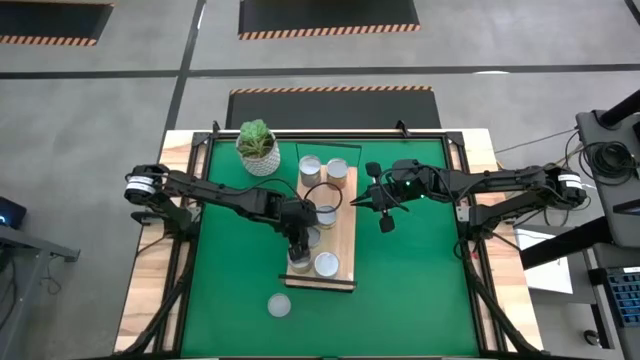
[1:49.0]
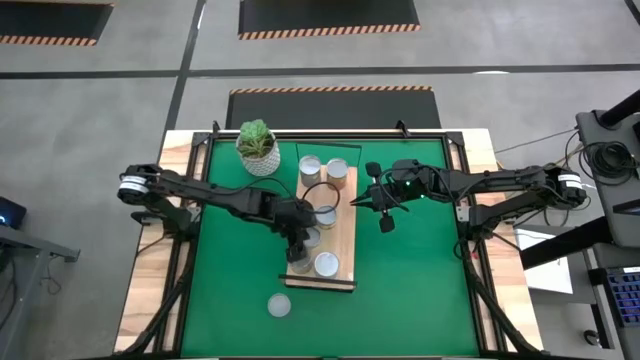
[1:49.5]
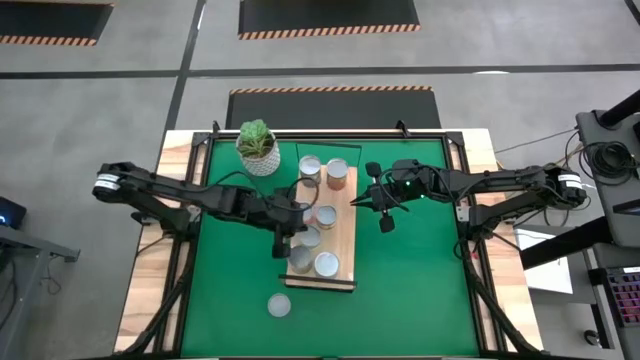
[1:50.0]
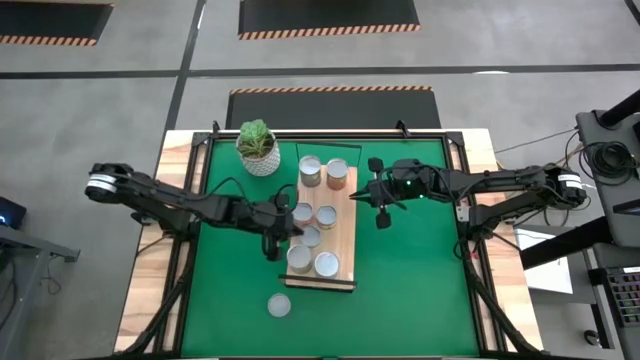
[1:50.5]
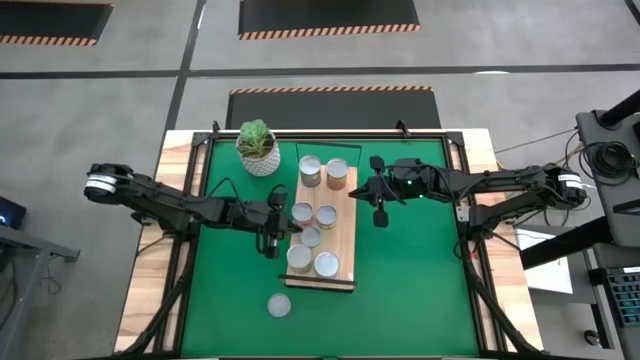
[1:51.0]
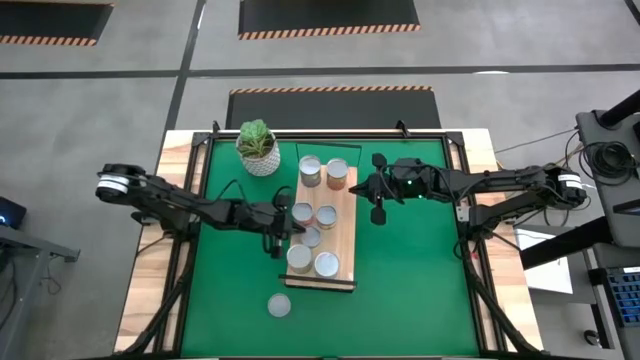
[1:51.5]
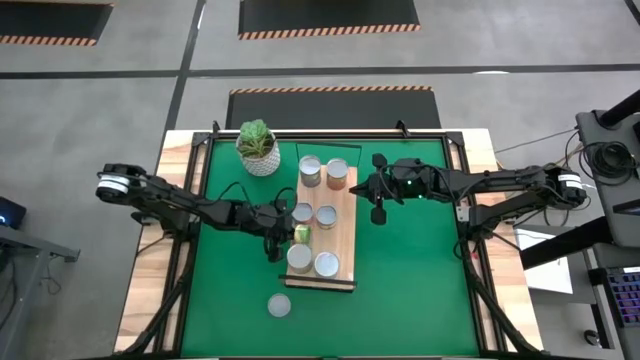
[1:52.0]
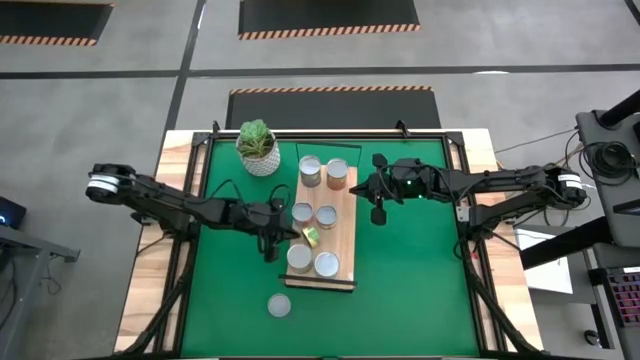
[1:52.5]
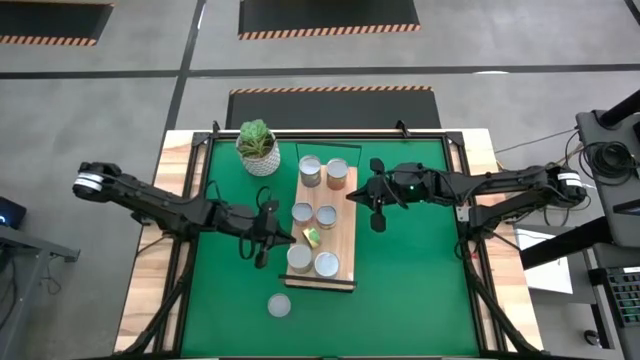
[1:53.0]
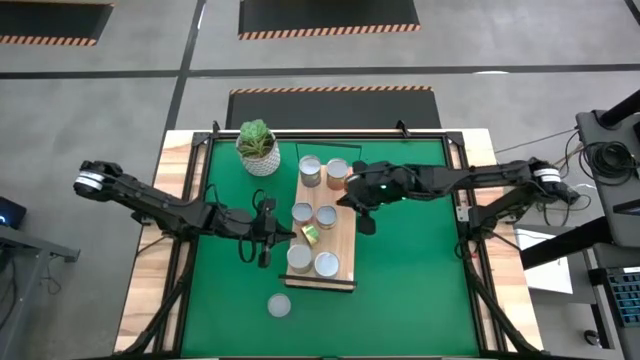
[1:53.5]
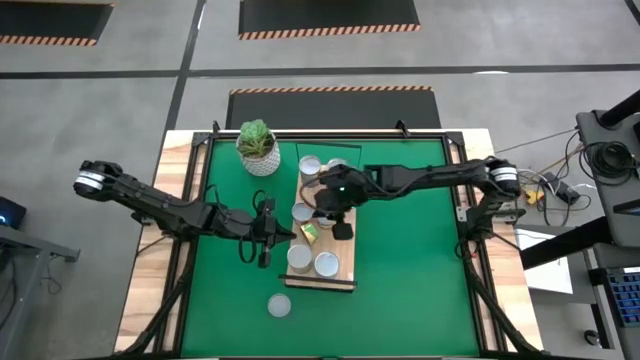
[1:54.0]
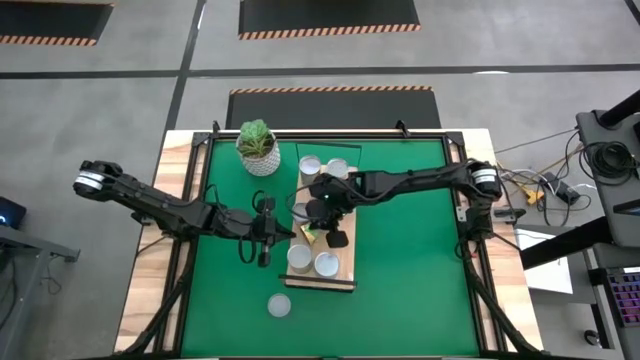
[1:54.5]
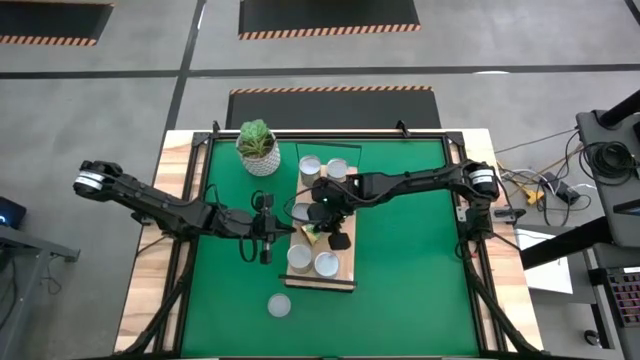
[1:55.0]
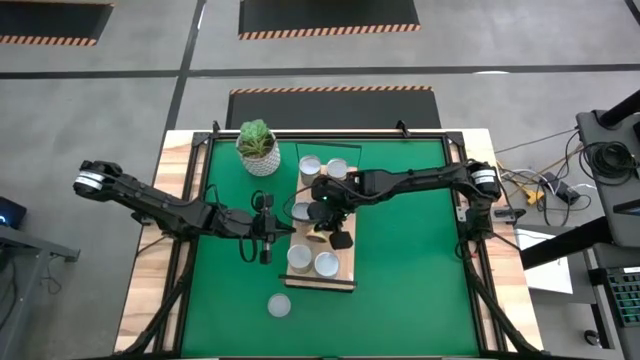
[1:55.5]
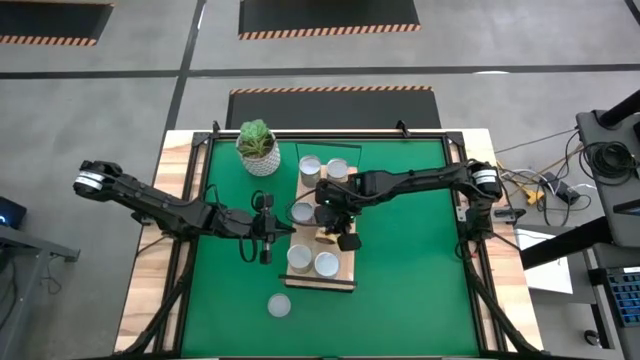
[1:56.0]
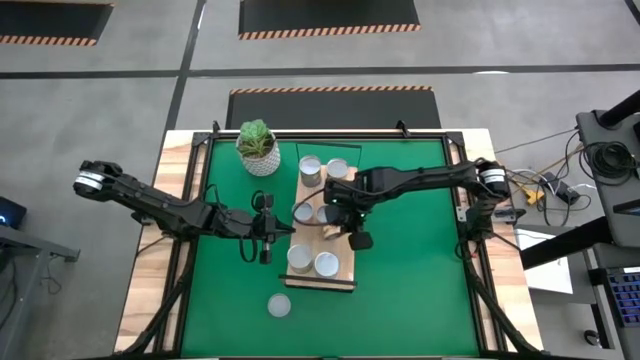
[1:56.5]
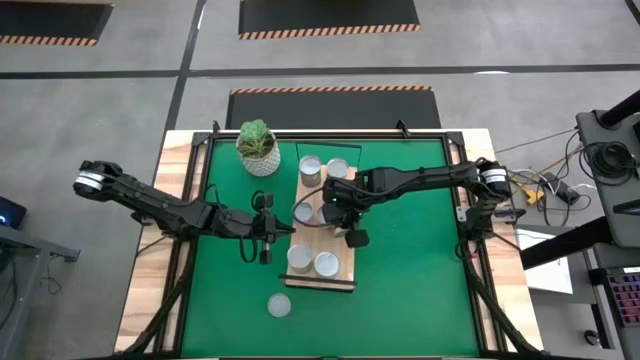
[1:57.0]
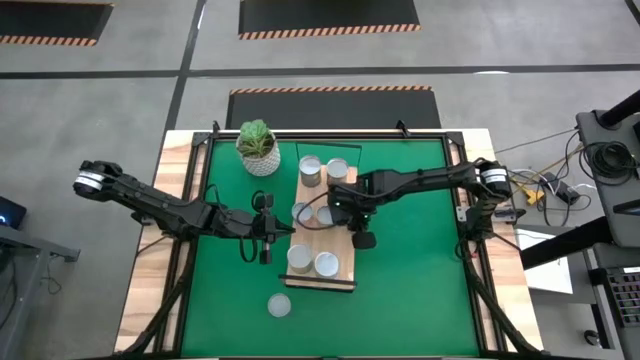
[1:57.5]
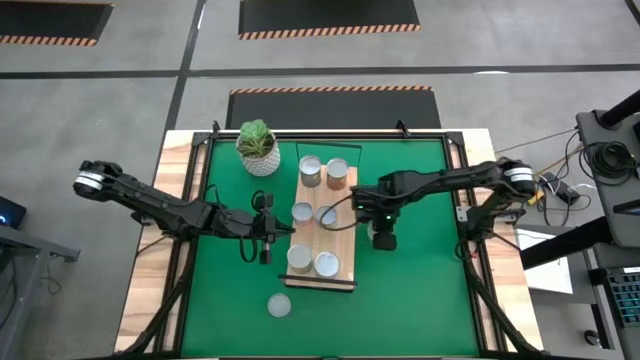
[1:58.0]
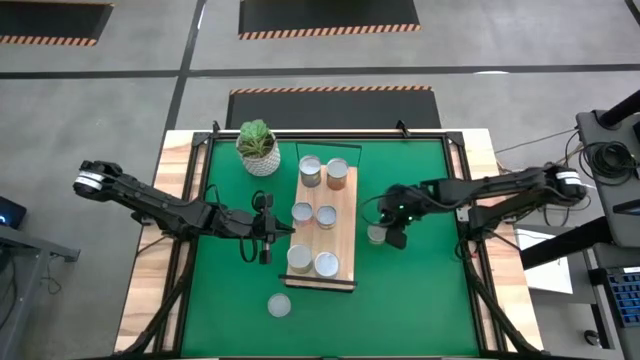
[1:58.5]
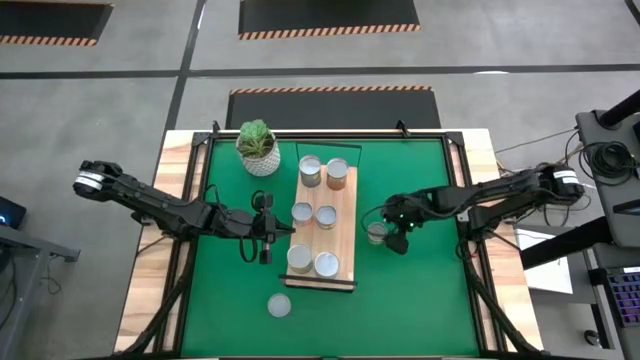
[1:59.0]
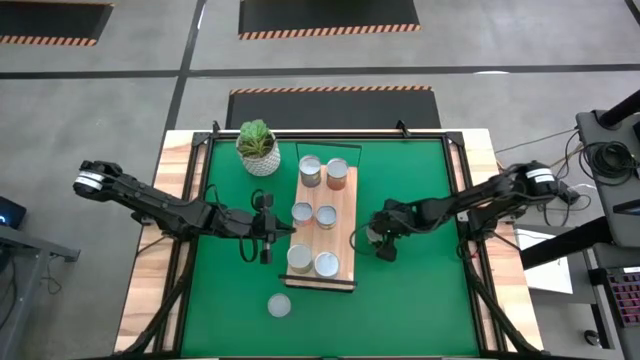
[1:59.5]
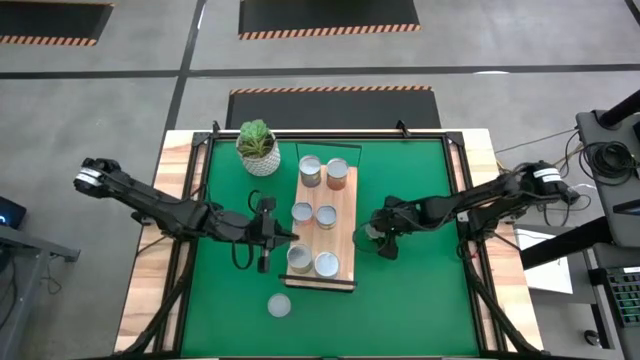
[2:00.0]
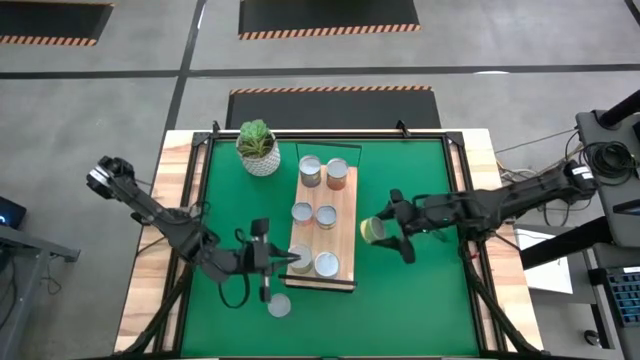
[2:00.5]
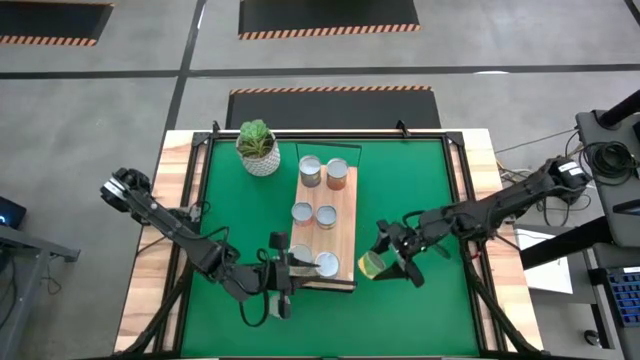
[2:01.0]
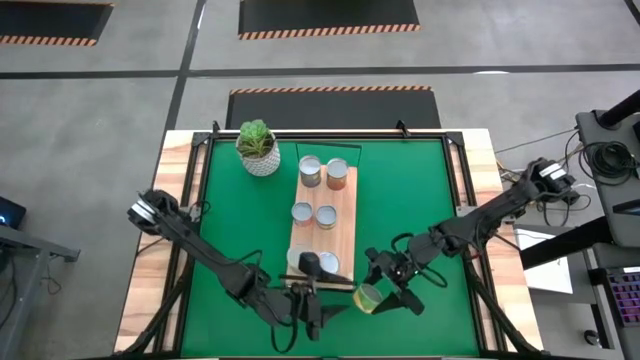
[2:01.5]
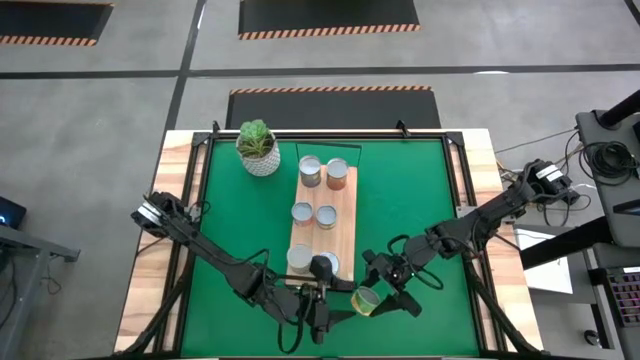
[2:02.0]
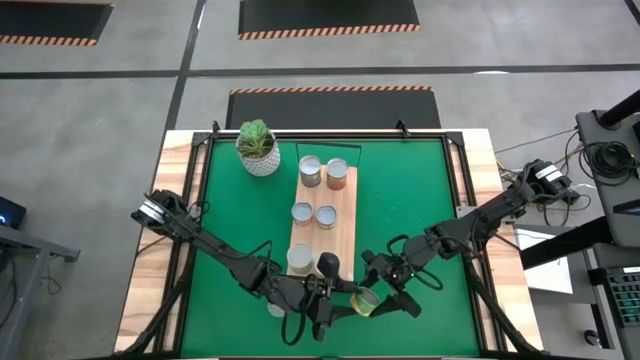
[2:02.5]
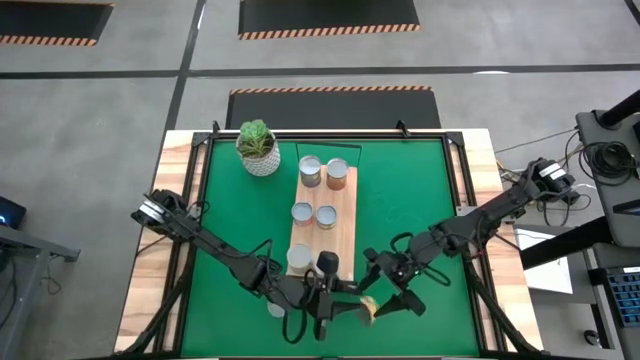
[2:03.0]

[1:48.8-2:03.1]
Task: Pick and place cans onto a shelf
Adjust the canned mushroom on the shelf

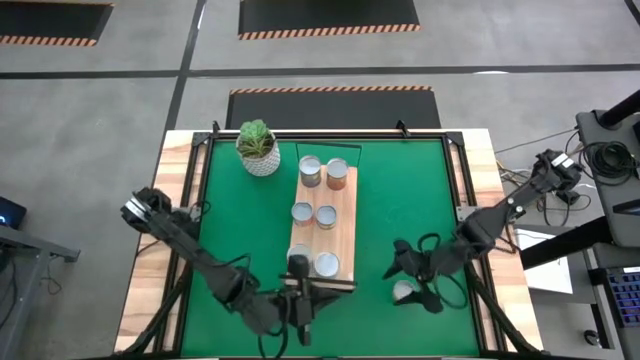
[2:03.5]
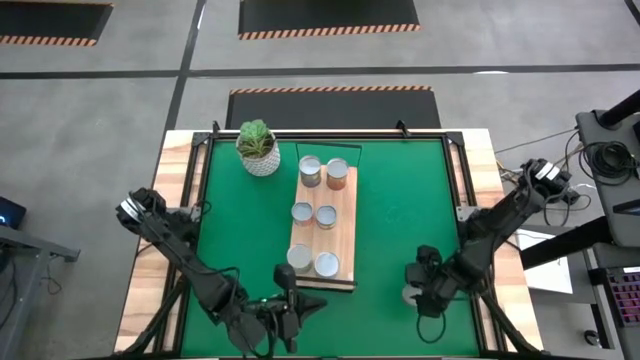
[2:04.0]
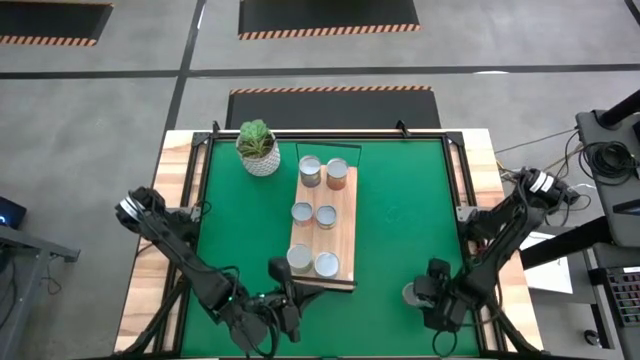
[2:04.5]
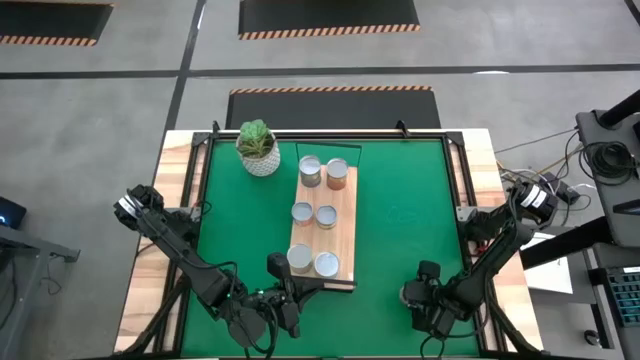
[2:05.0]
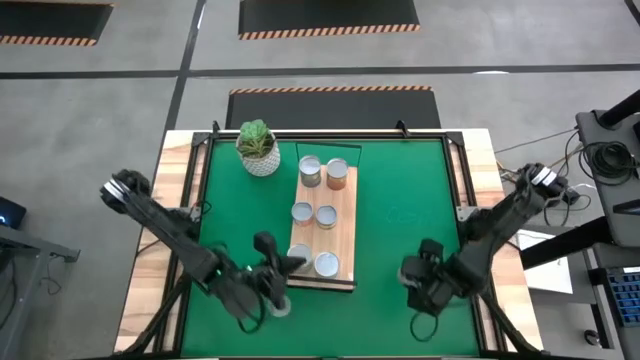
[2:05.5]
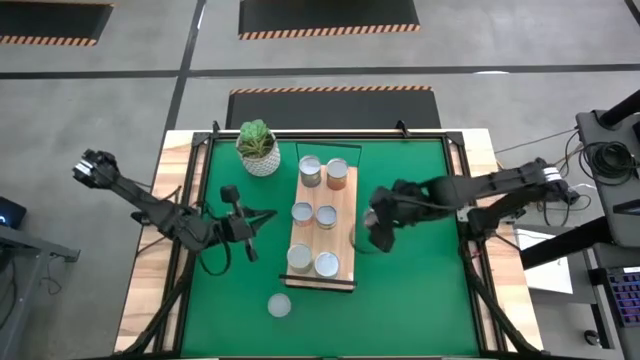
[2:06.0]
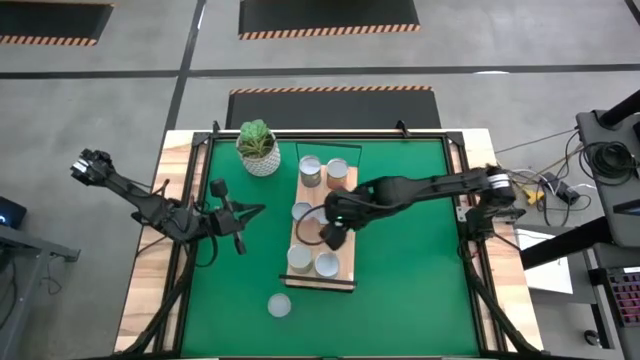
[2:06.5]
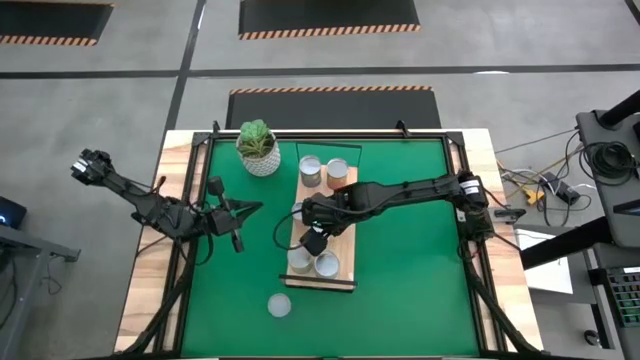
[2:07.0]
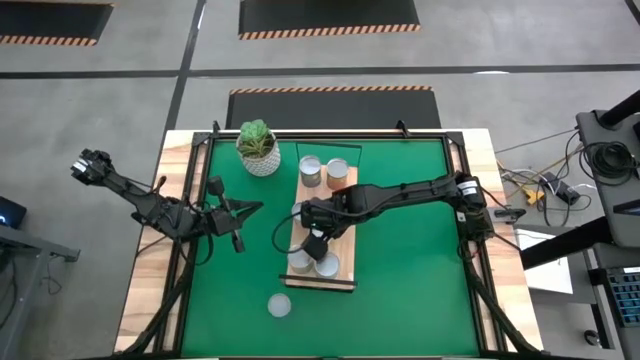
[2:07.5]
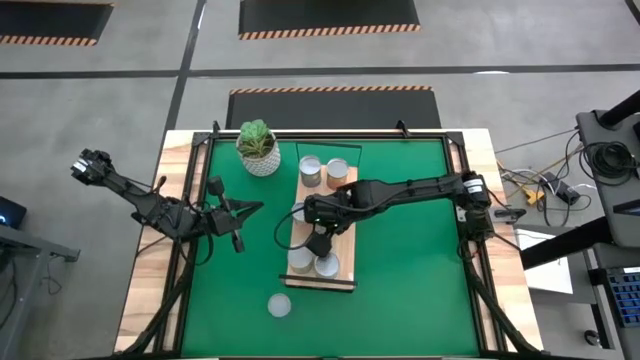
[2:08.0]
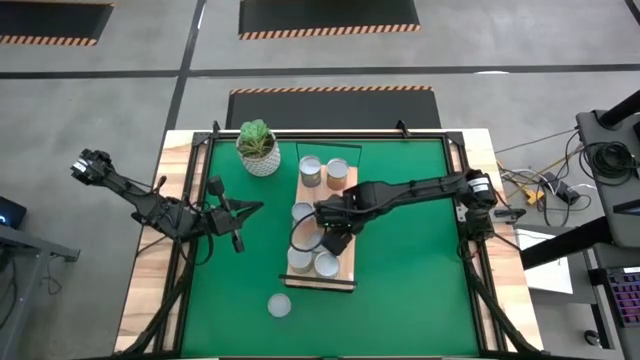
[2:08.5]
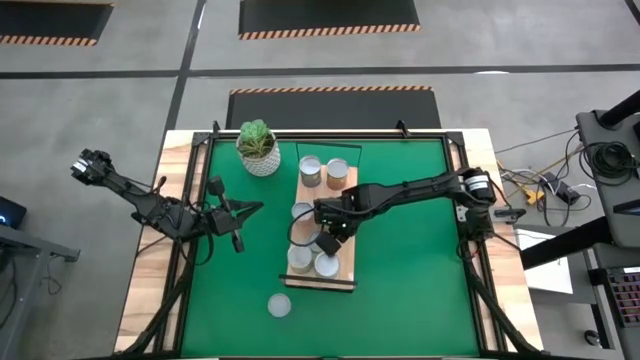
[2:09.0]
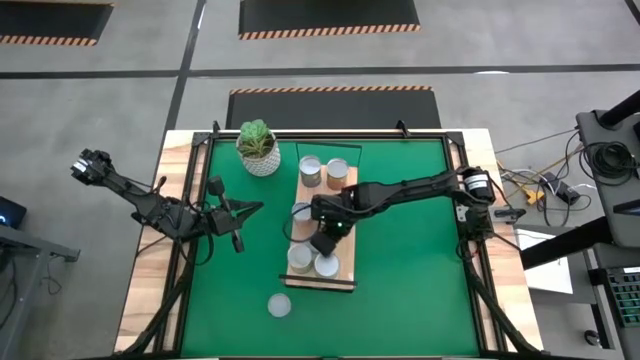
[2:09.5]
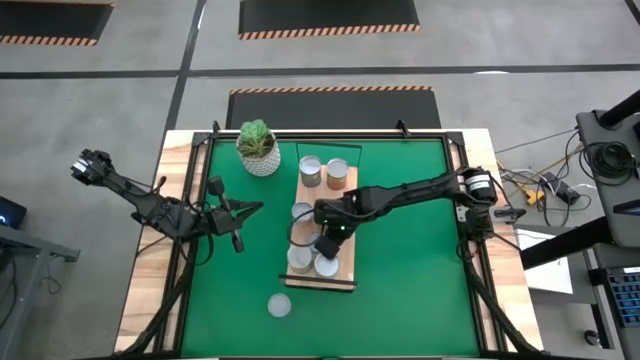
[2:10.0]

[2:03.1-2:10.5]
Adjust the canned mushroom on the shelf

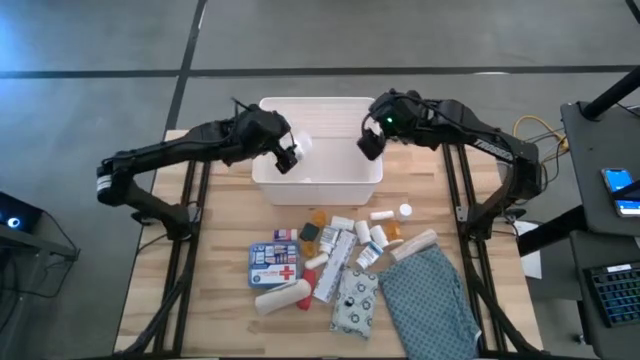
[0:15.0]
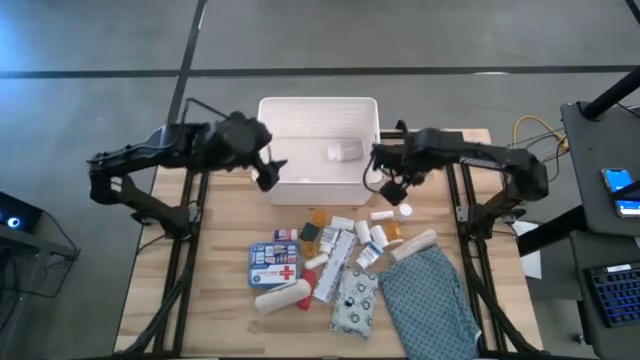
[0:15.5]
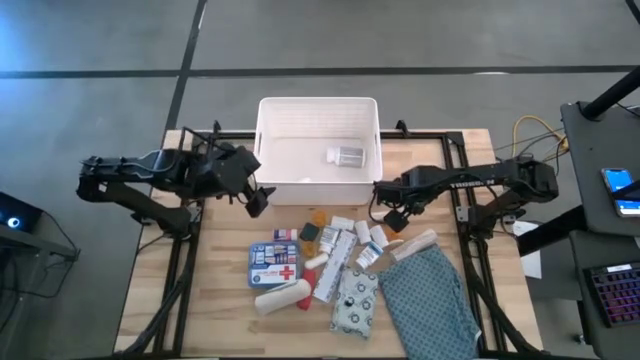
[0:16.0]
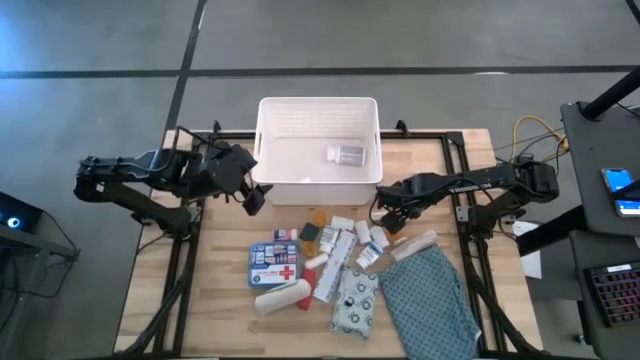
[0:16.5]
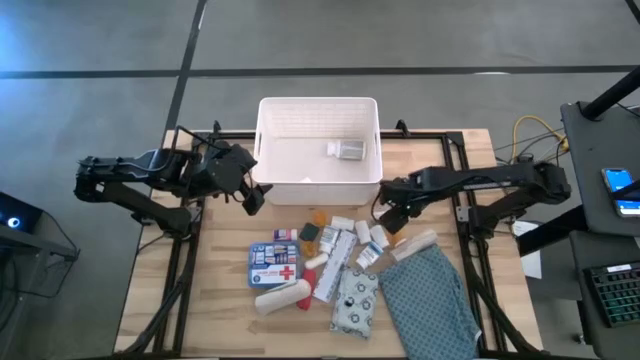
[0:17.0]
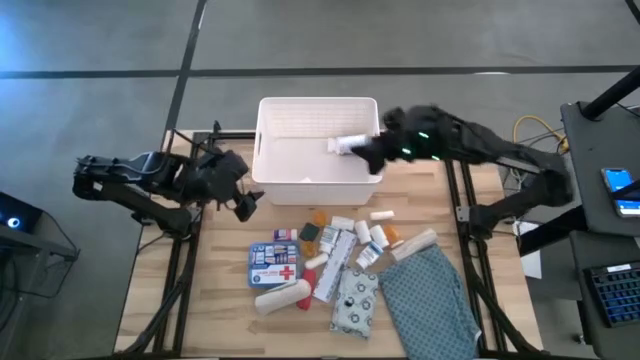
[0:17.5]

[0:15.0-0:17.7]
Task: Pick & place medical supplies in basket/bin
Put the white bottle into the white bin
